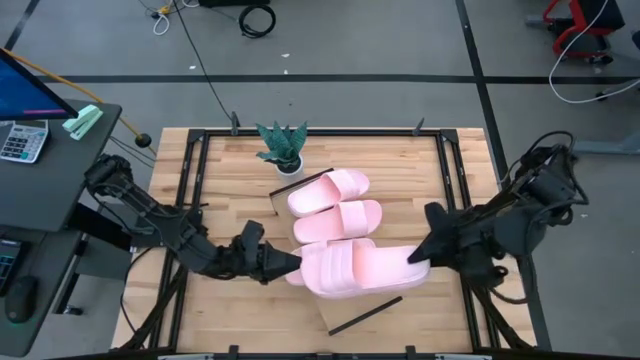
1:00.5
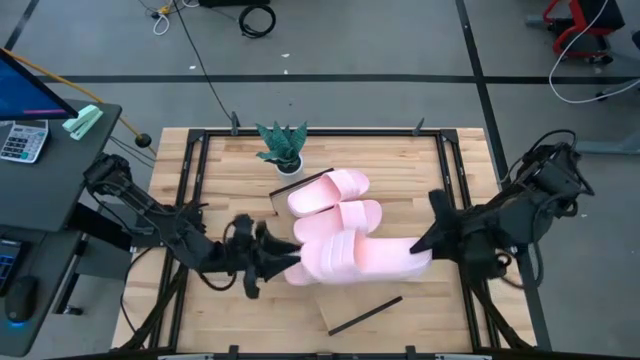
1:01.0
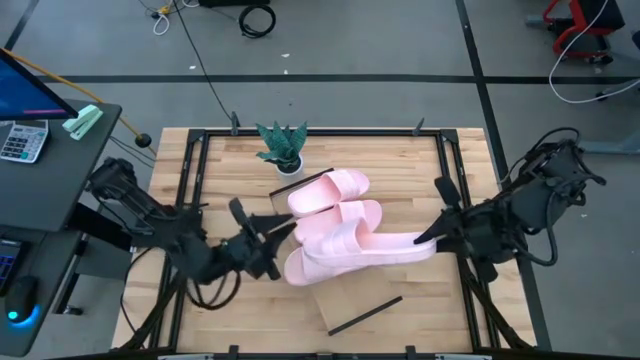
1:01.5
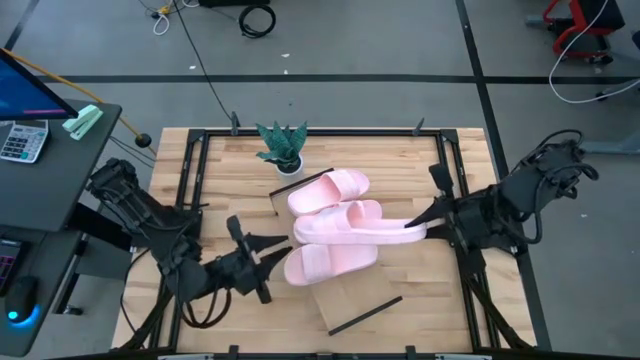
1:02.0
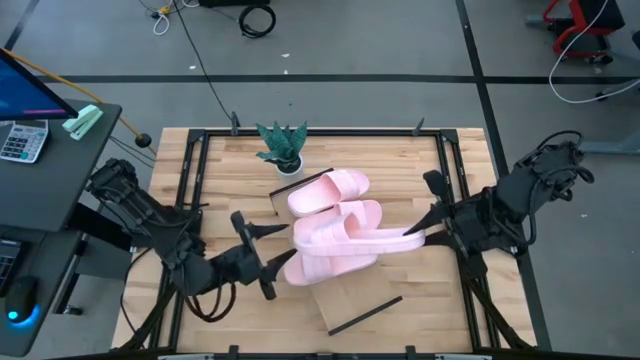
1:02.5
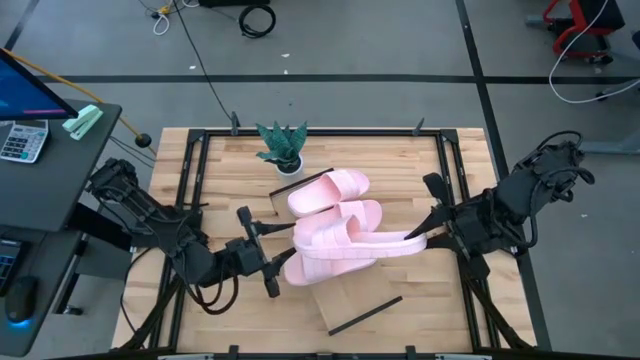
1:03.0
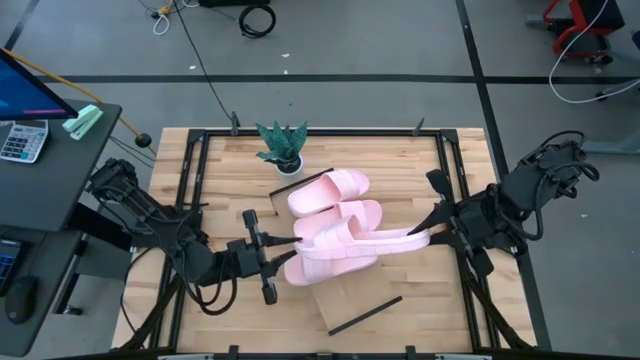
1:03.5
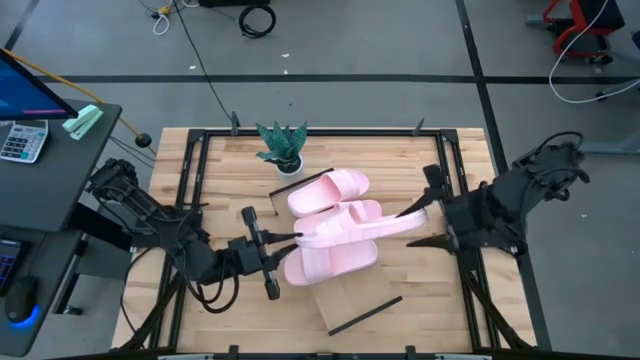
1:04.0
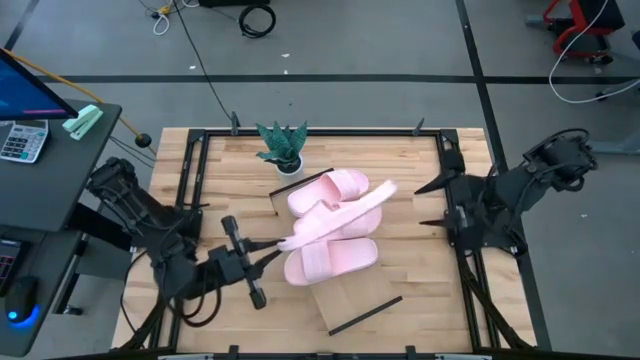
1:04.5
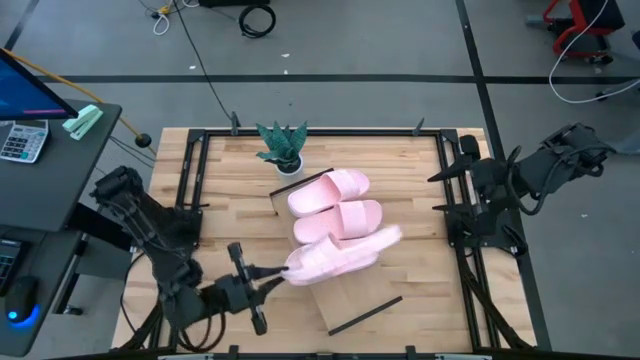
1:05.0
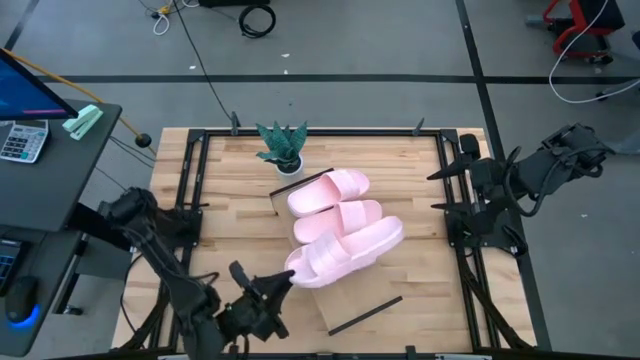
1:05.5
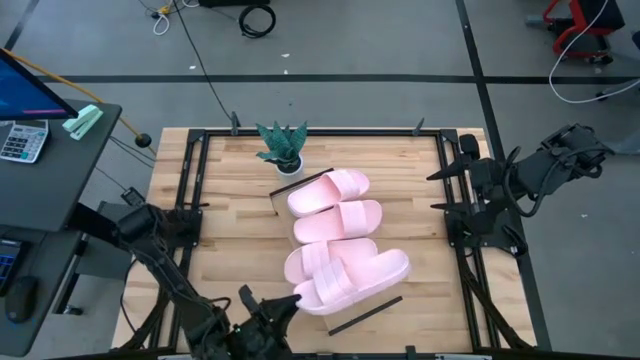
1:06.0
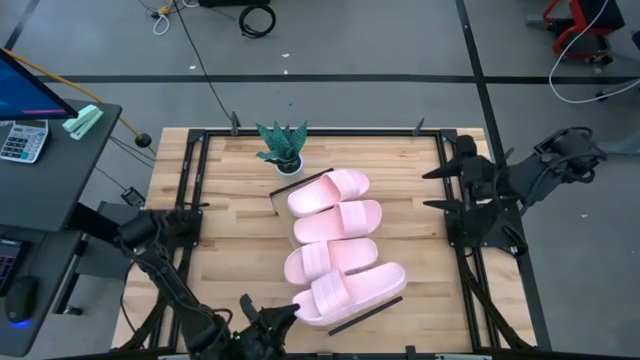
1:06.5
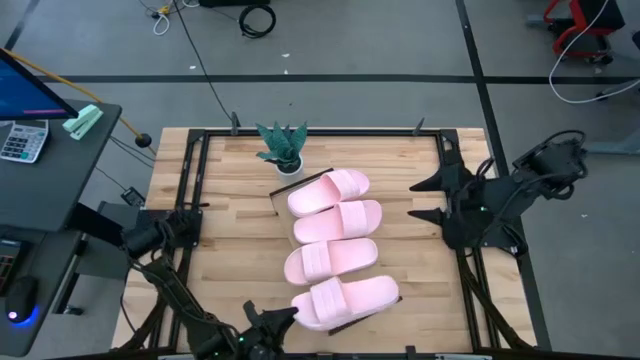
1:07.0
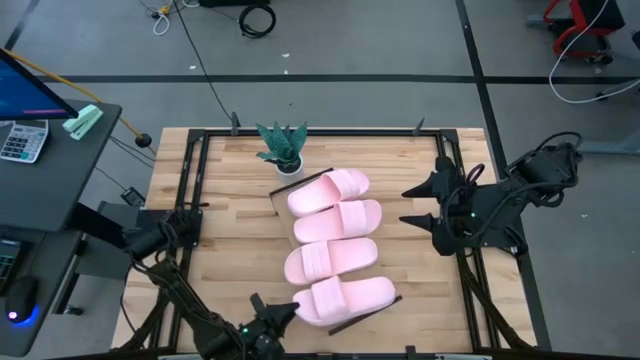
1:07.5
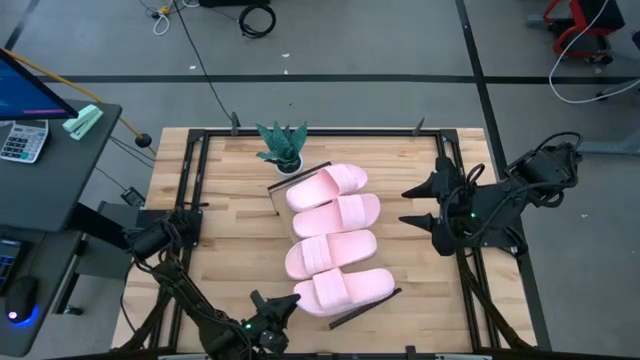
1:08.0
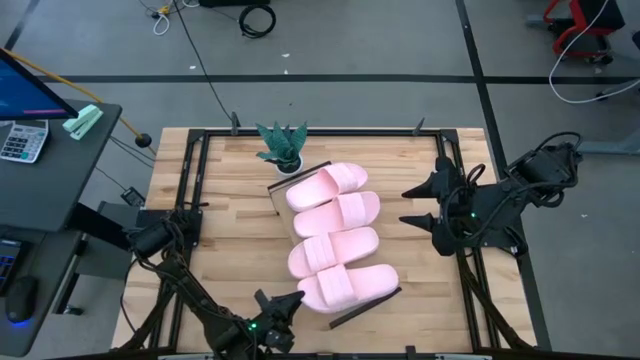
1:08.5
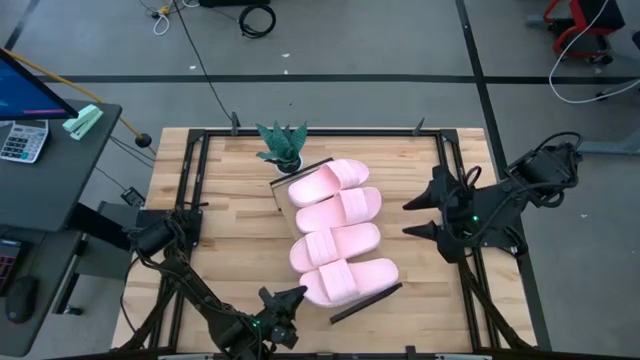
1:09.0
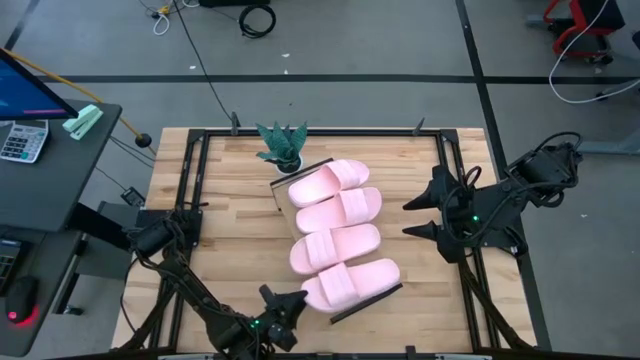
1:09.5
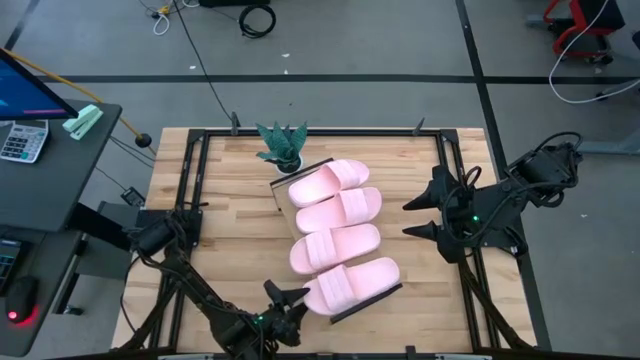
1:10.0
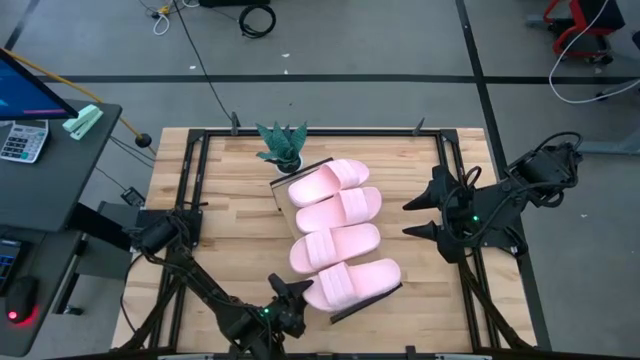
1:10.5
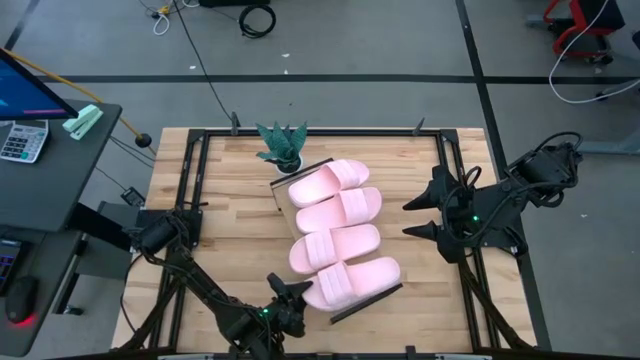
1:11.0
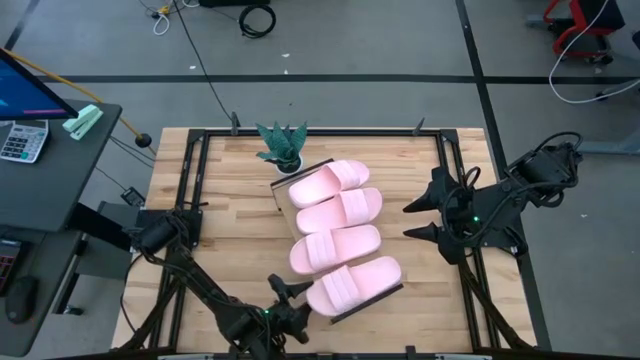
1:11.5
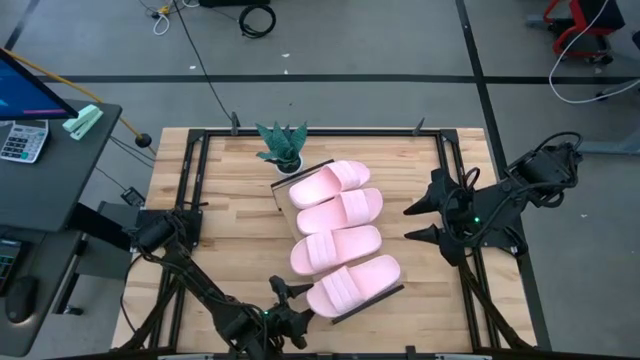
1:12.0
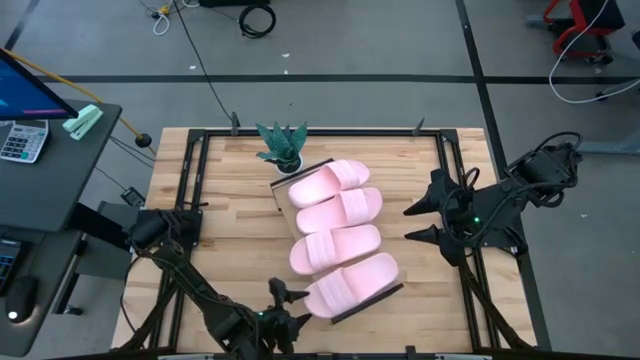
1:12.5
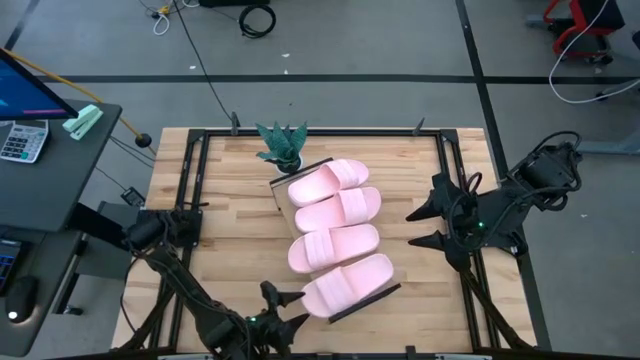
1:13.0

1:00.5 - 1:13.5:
Task: Pick and place slides into the shelf
Put the pink slipper on the shelf

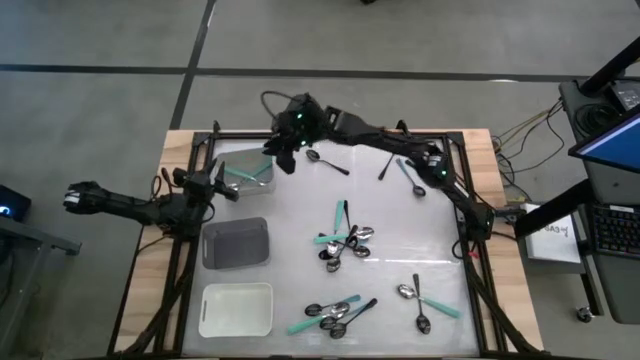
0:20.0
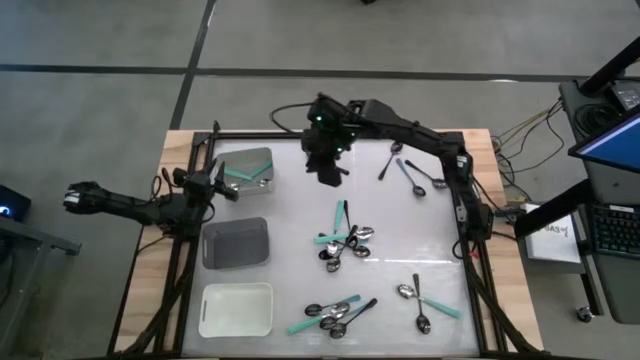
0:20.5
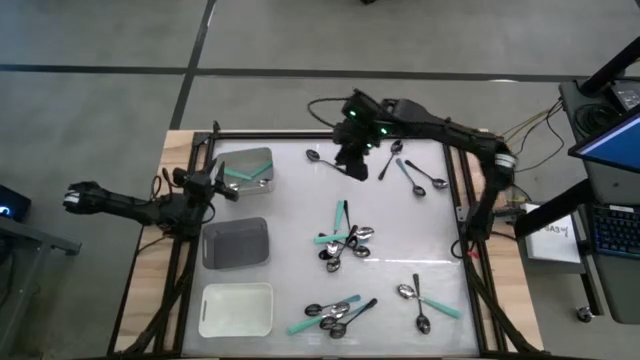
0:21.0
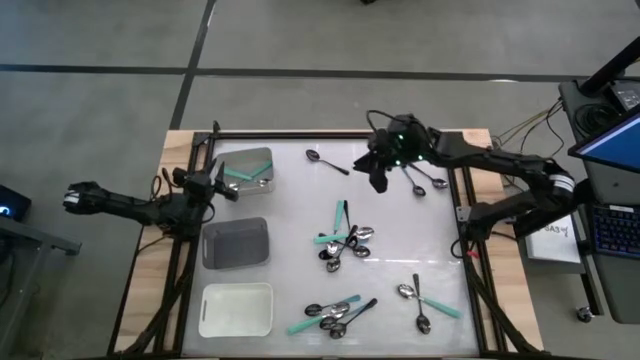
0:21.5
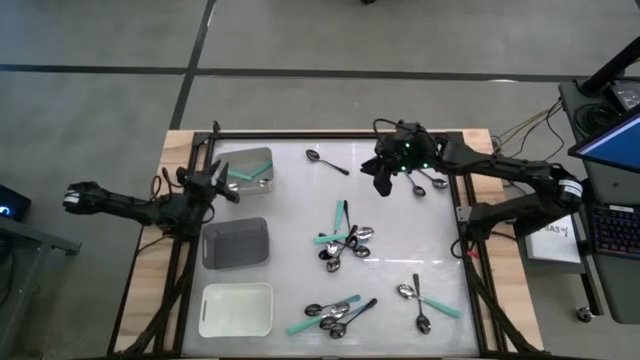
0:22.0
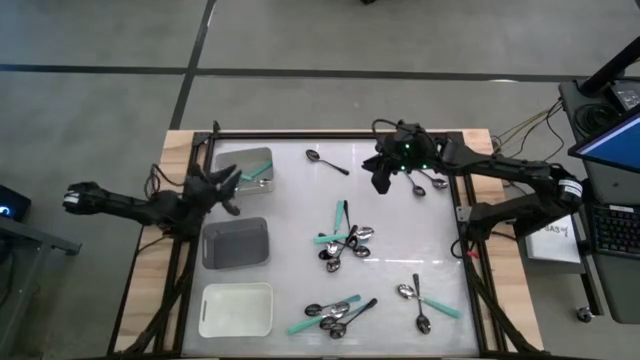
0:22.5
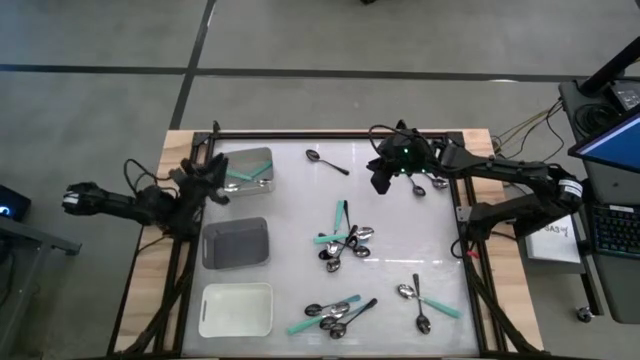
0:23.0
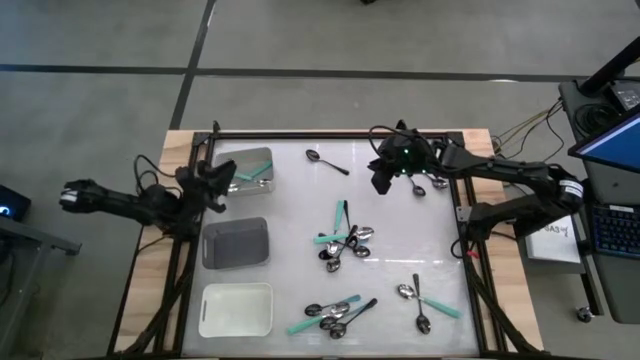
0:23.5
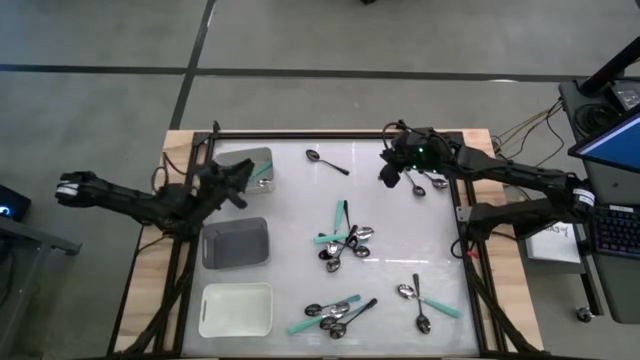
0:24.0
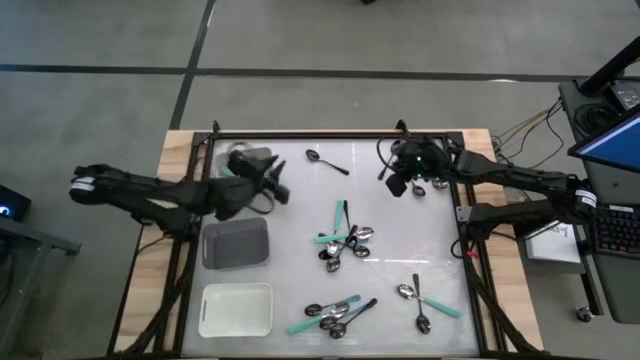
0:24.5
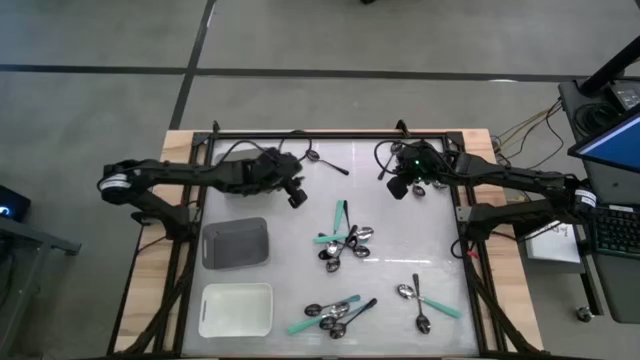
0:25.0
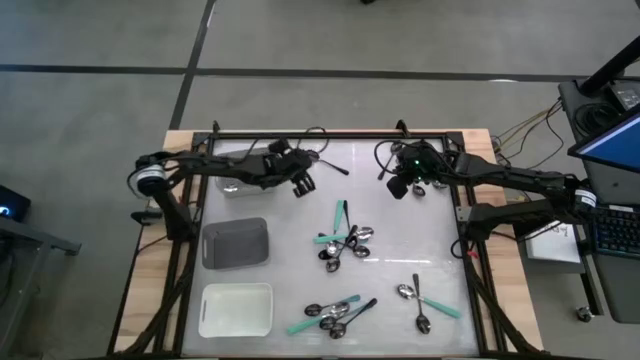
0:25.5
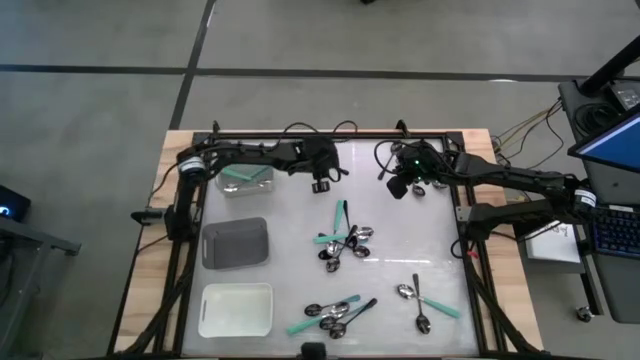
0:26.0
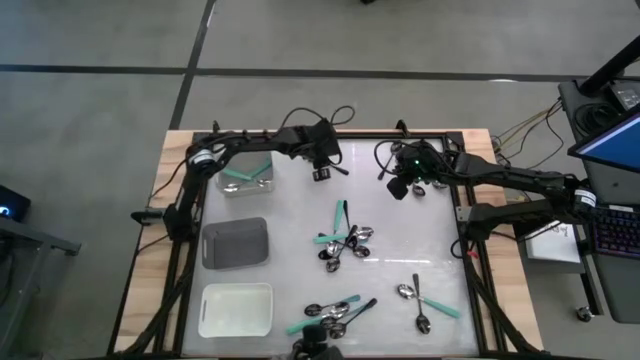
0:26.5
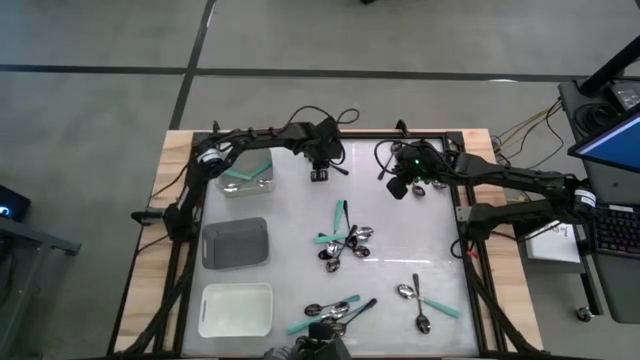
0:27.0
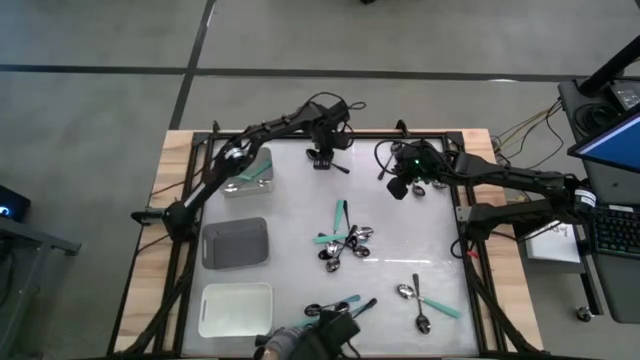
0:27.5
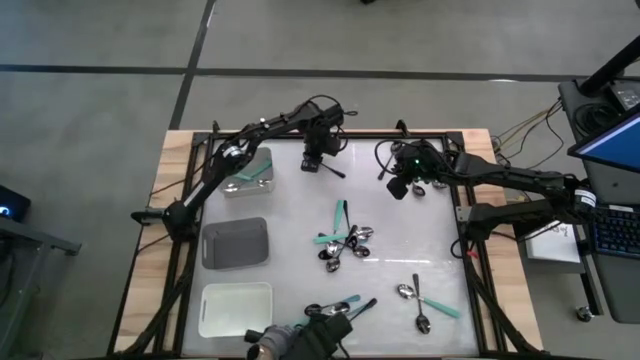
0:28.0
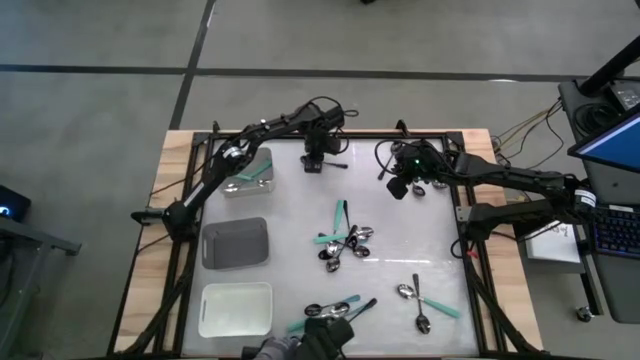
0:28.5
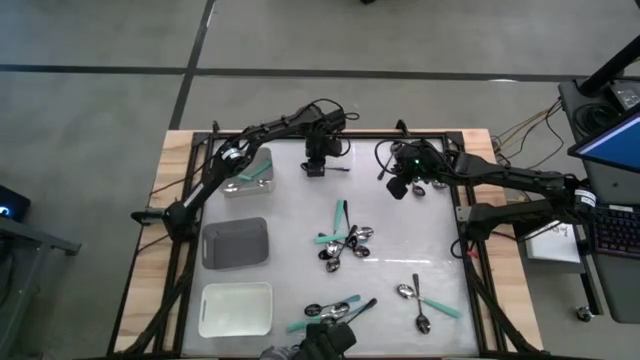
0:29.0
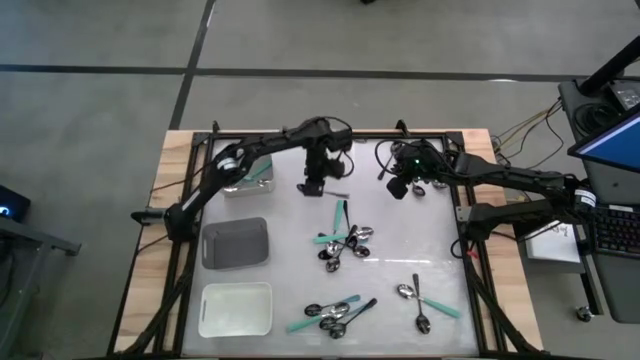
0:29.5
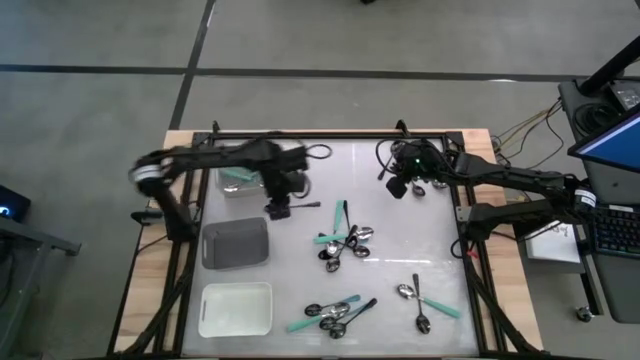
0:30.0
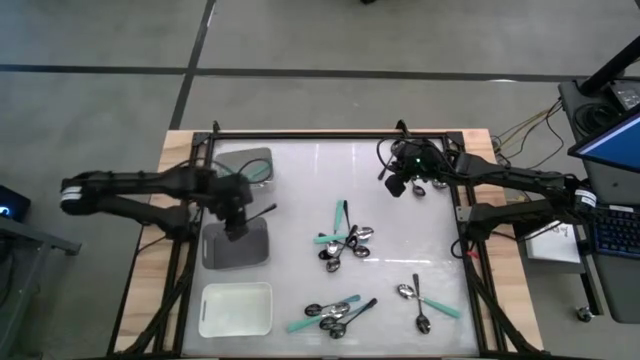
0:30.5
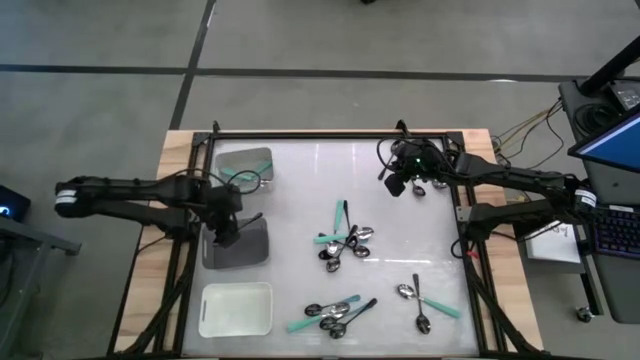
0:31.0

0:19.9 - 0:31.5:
Task: Sort silverware by color (type)
Put the black spoon into the black bin
